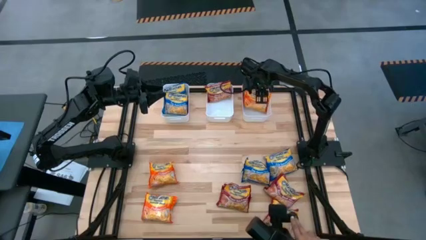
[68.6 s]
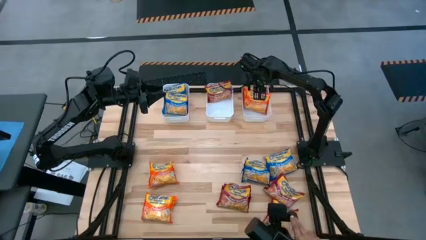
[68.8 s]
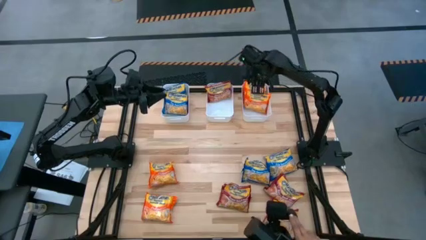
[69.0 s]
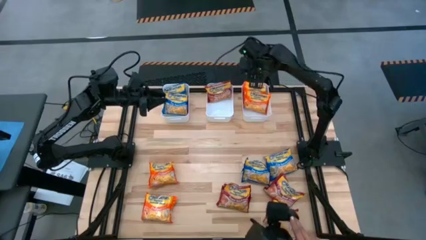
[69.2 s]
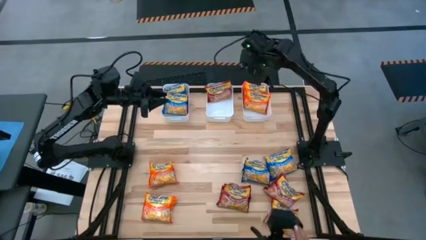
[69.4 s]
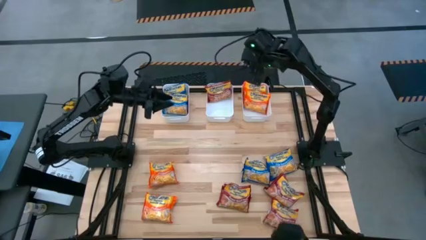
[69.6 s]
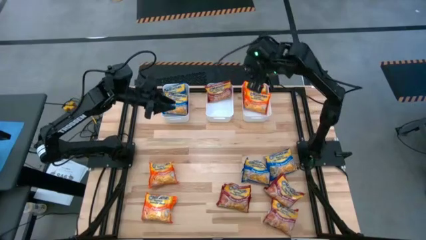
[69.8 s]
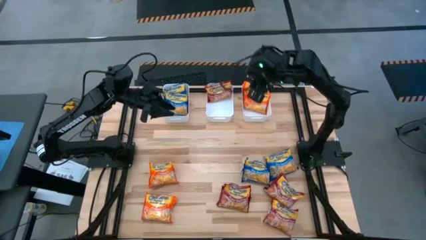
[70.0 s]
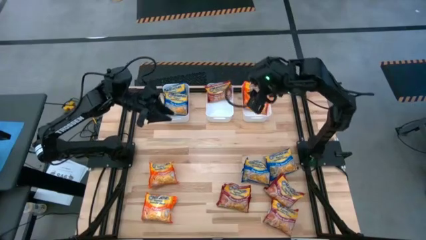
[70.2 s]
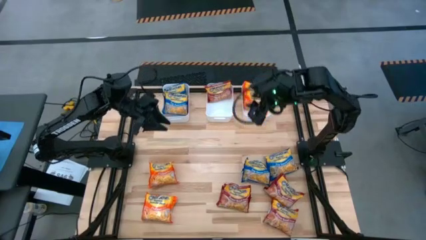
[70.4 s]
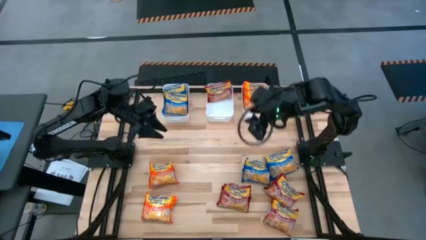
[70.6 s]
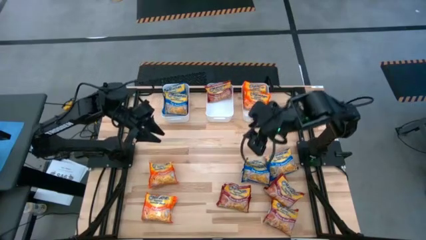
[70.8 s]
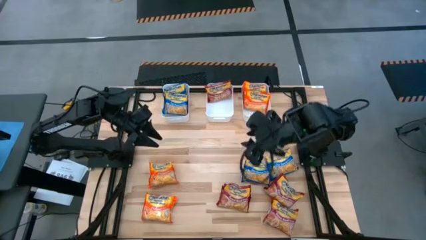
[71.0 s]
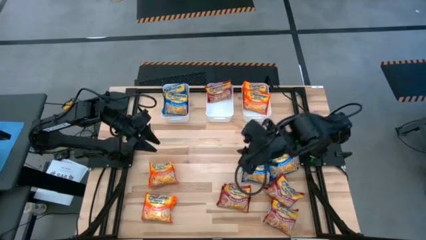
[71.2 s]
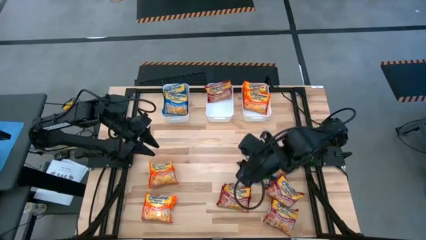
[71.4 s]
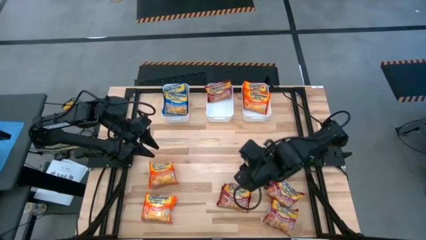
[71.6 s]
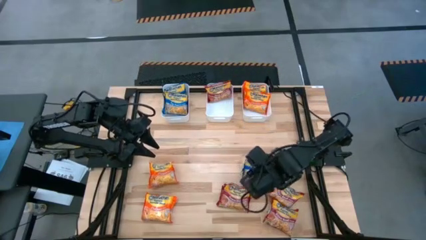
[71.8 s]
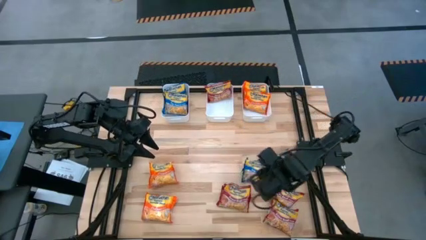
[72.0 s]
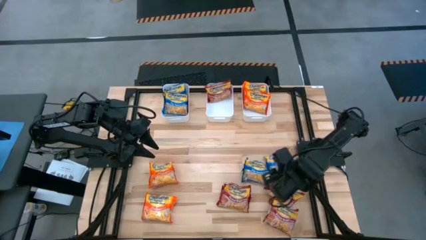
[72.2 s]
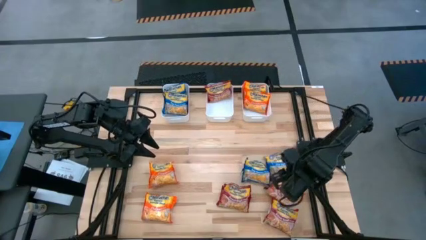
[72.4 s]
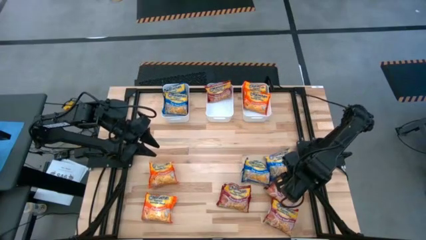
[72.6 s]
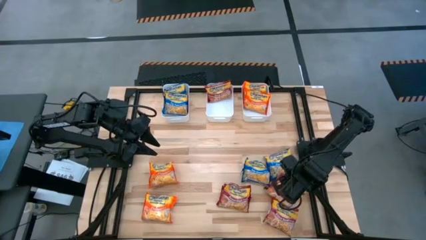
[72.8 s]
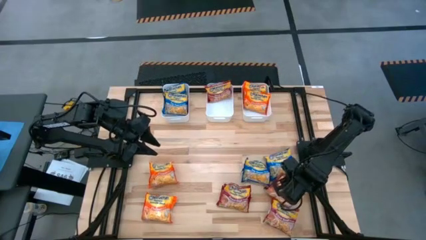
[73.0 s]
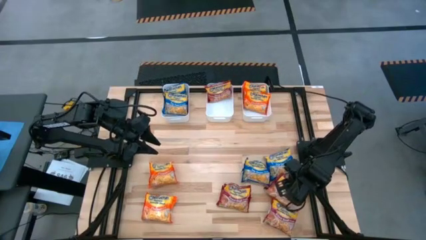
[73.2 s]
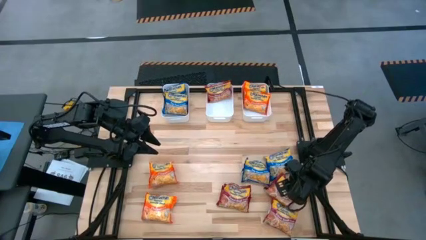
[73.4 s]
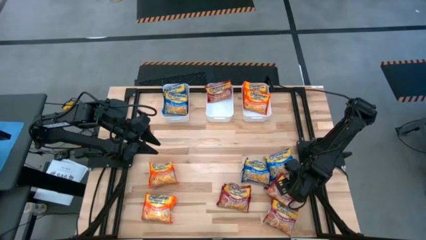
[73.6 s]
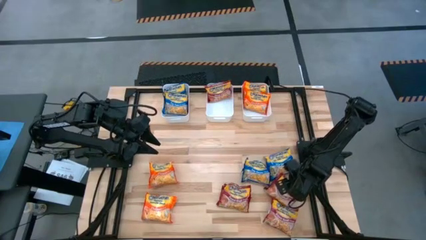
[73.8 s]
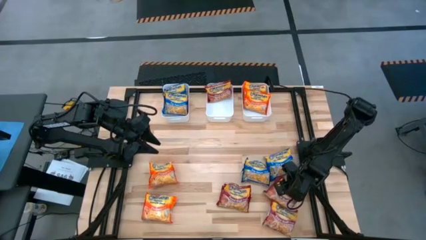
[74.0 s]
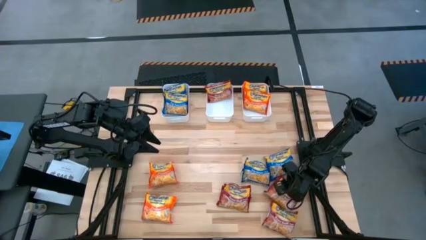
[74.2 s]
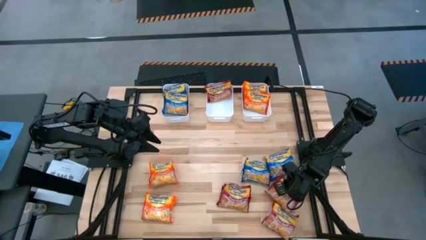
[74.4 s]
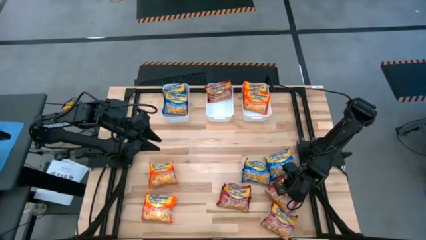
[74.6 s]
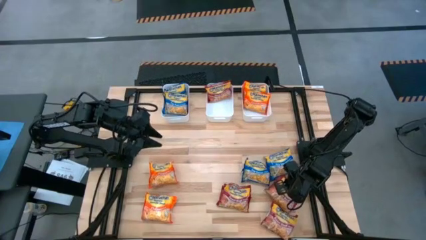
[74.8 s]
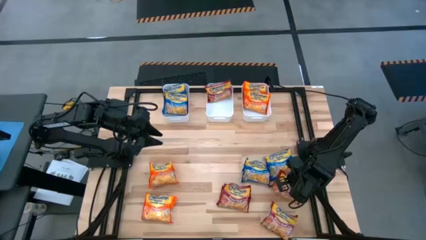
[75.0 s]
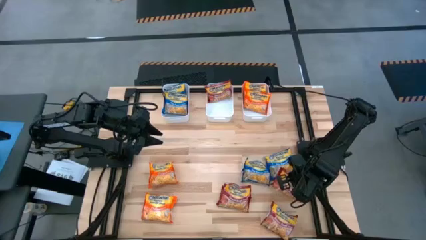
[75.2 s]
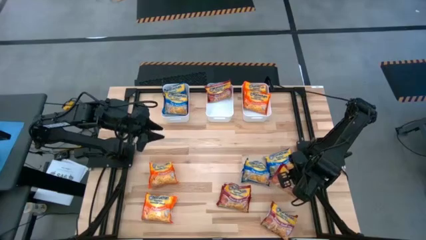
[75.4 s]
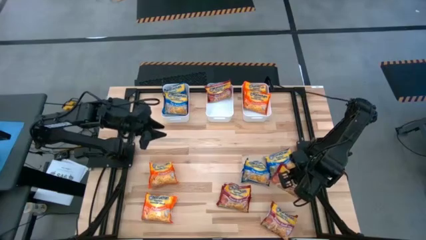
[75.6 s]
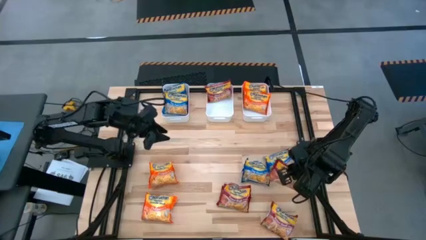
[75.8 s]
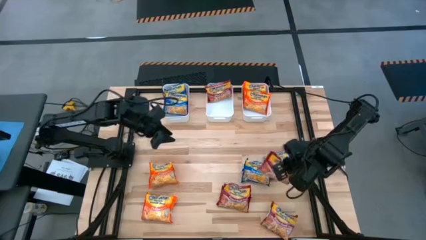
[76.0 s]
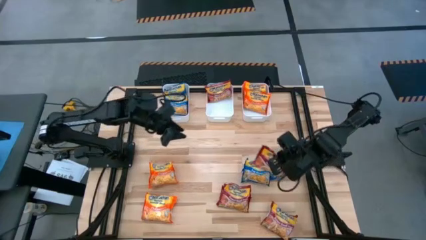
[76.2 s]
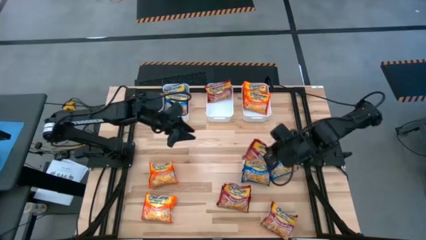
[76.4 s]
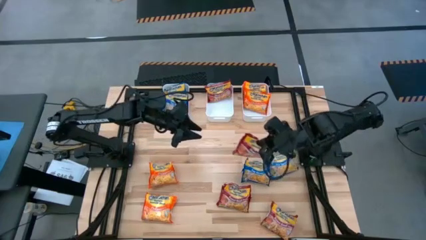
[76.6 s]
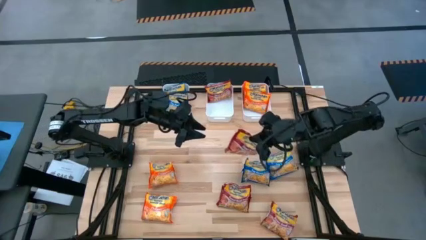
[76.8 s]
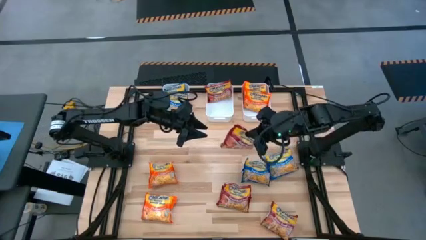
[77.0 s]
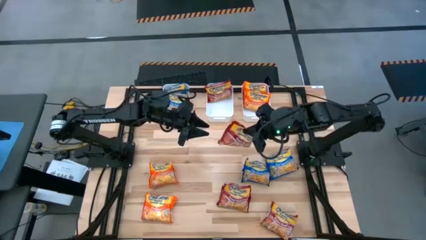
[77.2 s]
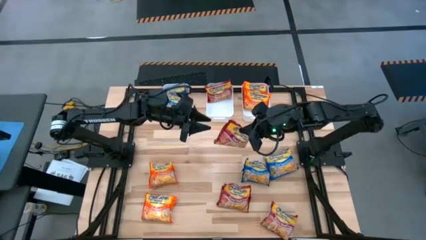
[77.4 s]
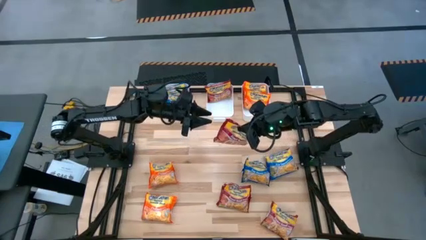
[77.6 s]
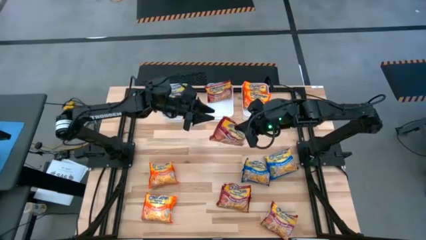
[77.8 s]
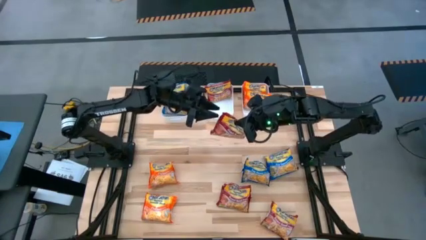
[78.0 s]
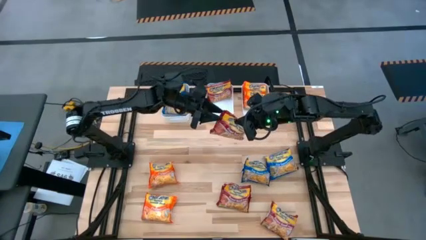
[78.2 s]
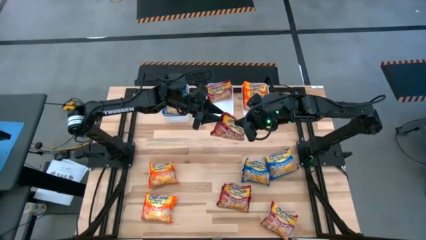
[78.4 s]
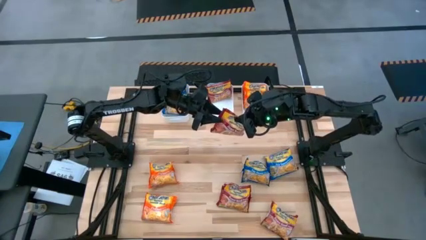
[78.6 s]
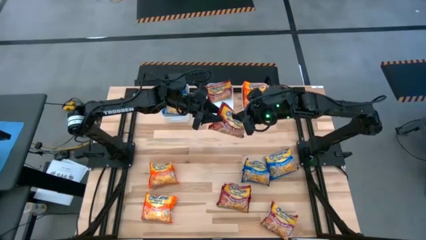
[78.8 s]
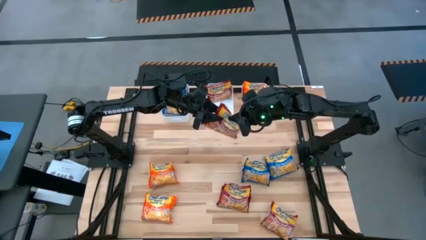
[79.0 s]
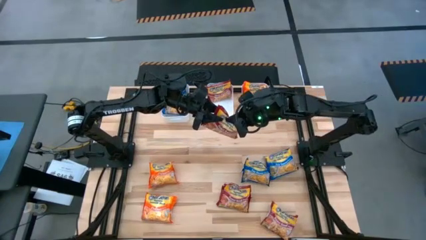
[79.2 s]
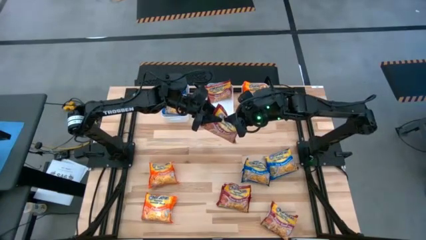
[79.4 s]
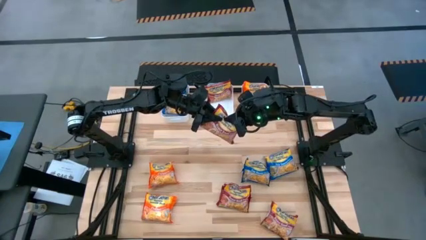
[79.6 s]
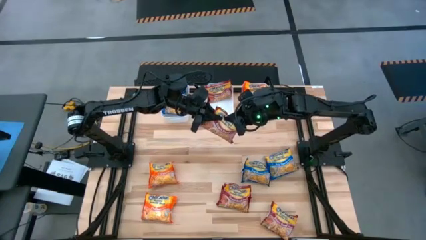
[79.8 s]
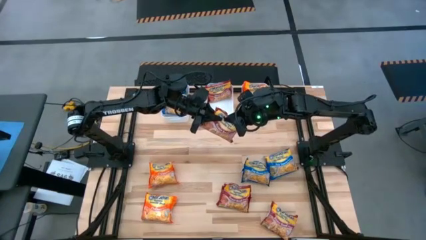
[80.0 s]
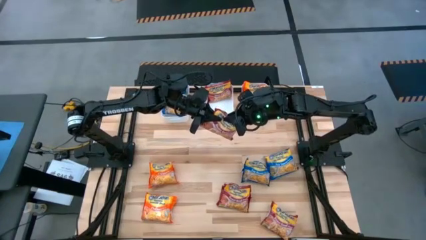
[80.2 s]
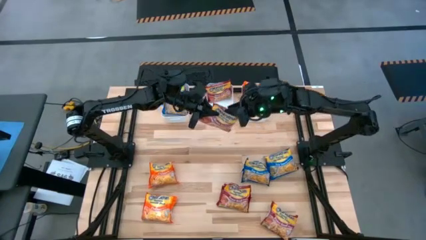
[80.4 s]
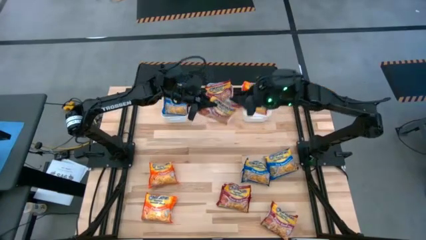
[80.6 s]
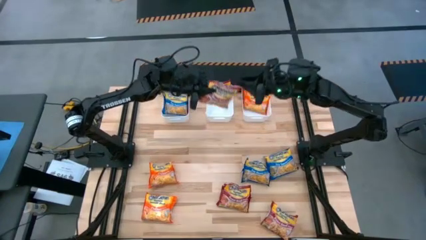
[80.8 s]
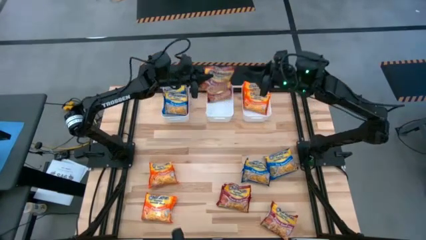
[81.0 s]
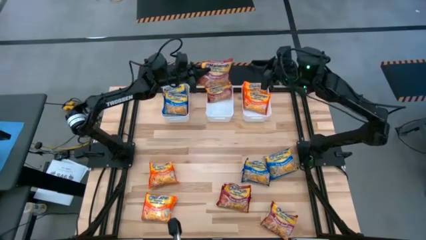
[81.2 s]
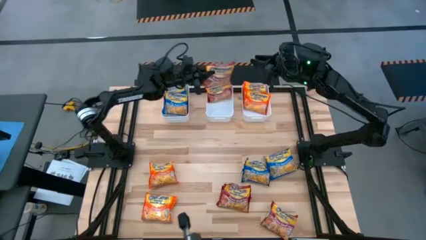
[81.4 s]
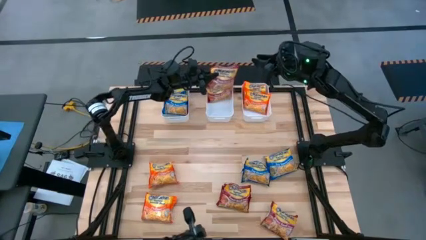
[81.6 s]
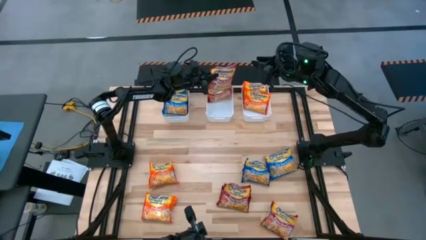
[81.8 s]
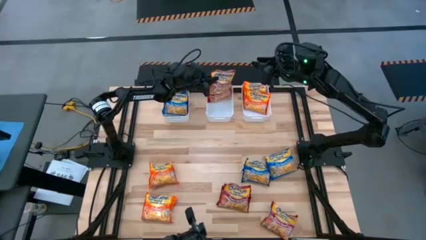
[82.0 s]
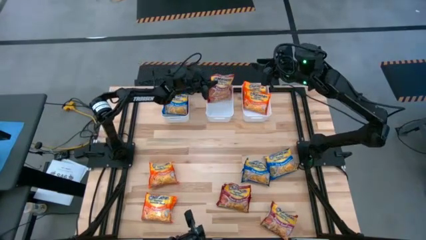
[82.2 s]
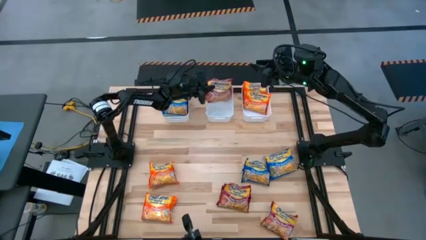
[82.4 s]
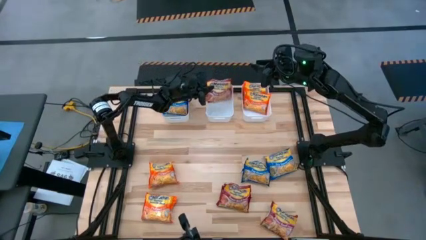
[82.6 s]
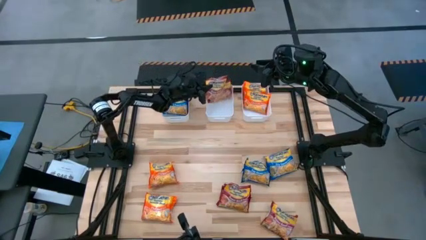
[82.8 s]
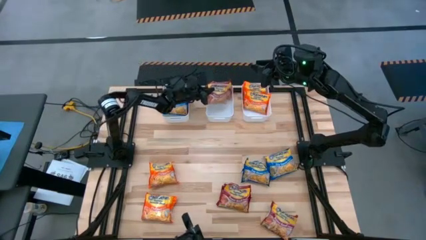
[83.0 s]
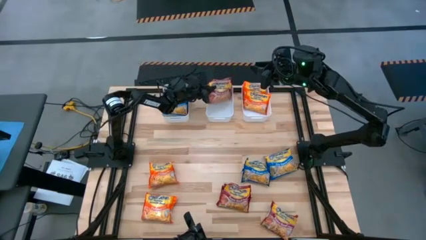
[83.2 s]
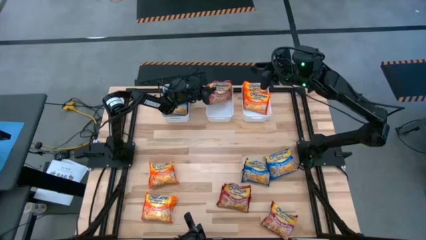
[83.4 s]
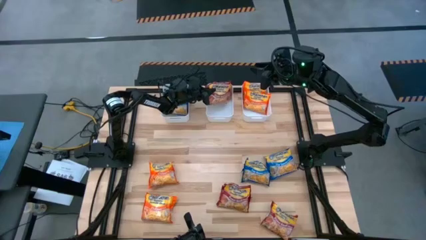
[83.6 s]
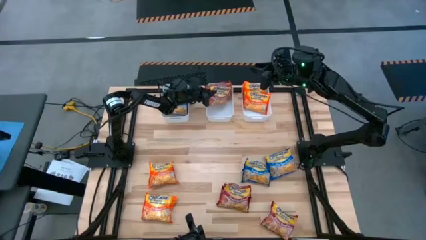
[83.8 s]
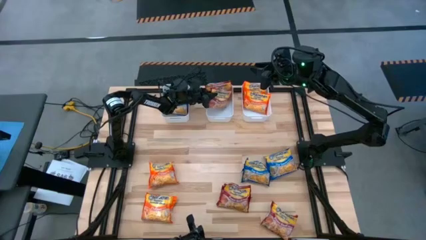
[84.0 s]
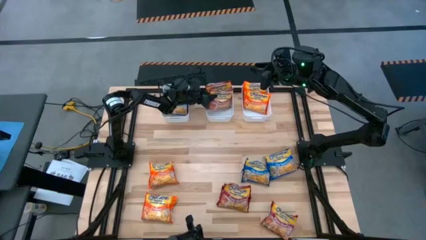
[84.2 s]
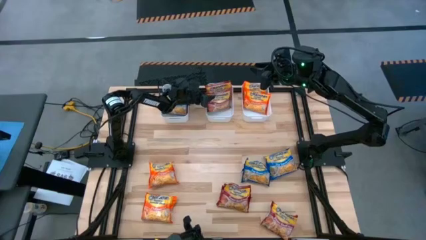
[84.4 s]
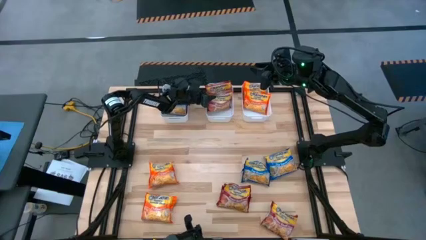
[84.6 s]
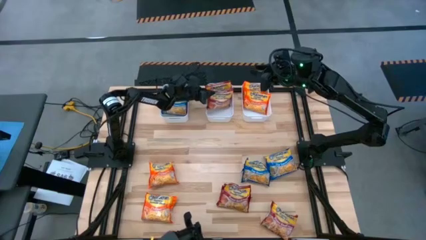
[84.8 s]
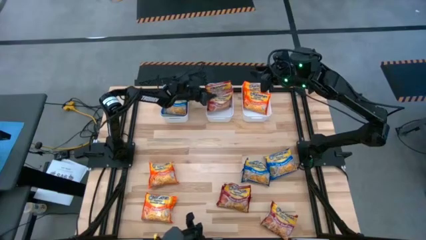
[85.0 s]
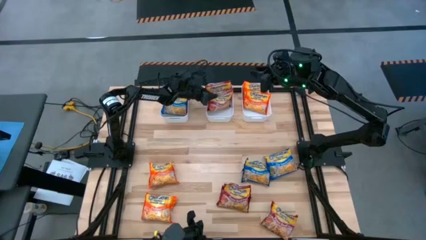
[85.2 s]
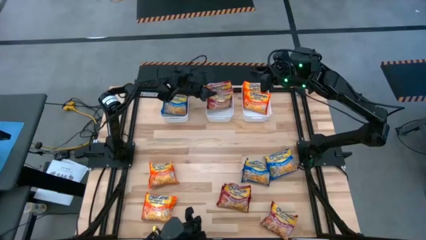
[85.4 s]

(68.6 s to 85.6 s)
Task: Sort Maruchan noodles
Put the red noodle pack into the middle white bin
